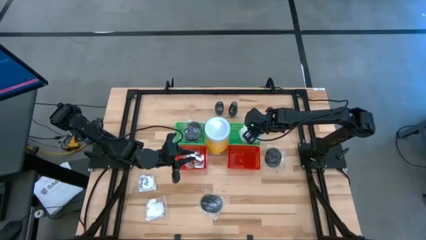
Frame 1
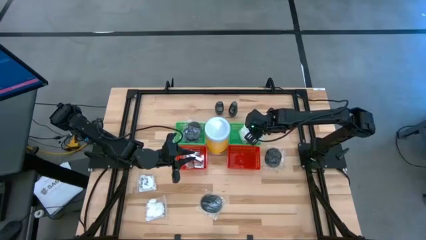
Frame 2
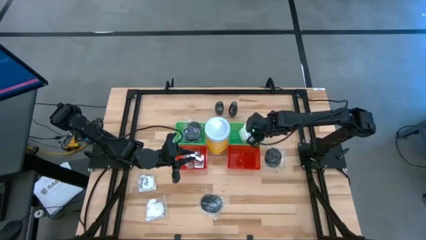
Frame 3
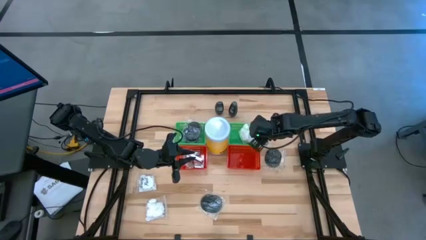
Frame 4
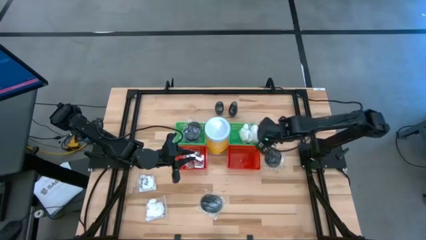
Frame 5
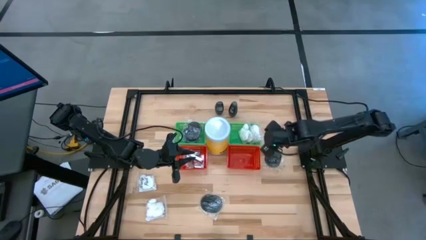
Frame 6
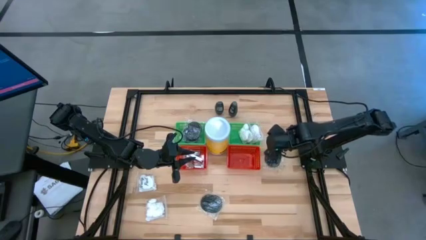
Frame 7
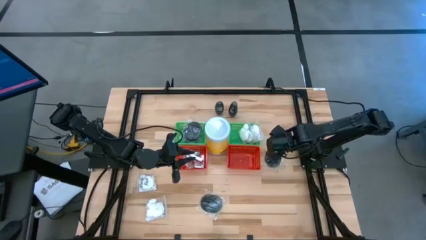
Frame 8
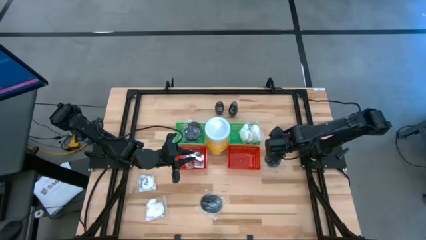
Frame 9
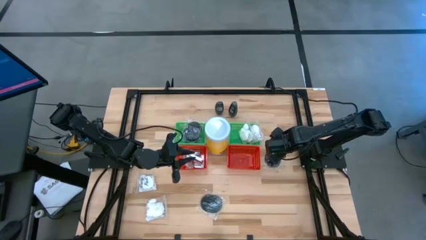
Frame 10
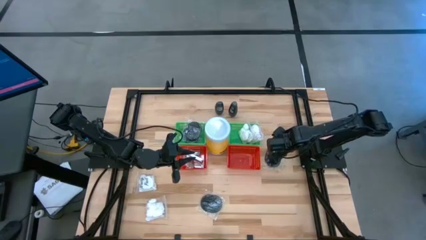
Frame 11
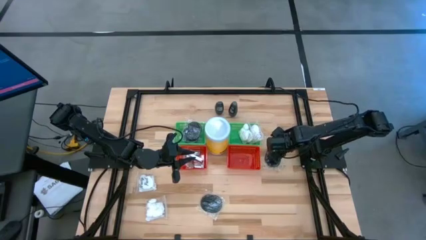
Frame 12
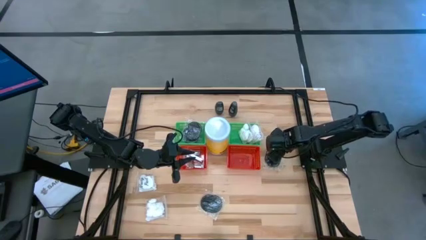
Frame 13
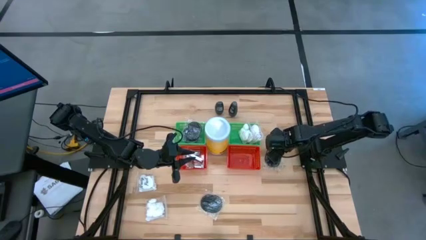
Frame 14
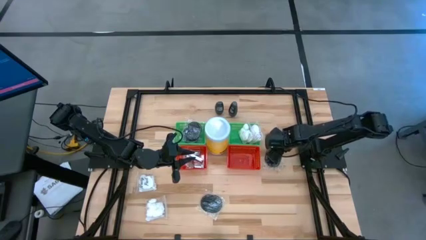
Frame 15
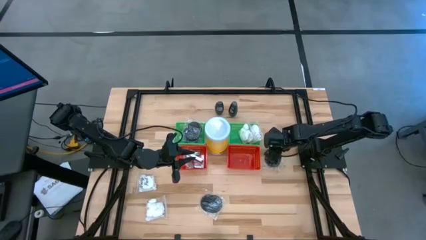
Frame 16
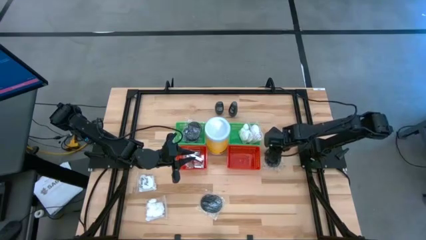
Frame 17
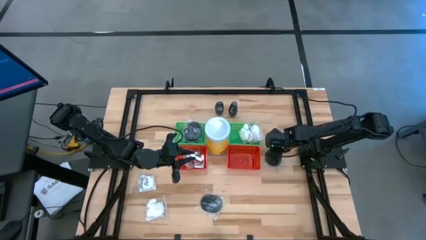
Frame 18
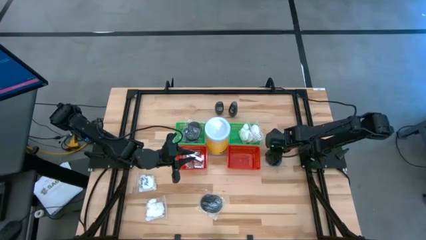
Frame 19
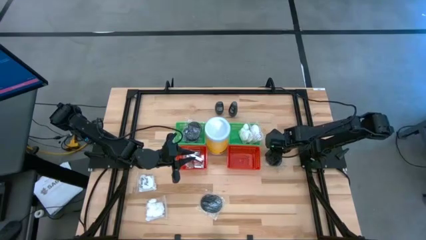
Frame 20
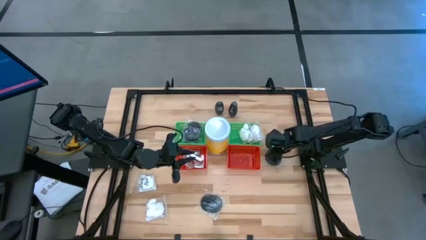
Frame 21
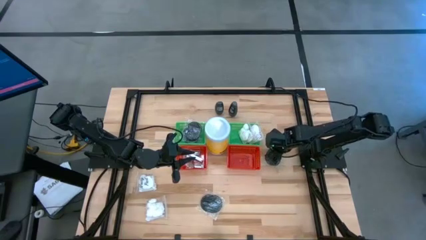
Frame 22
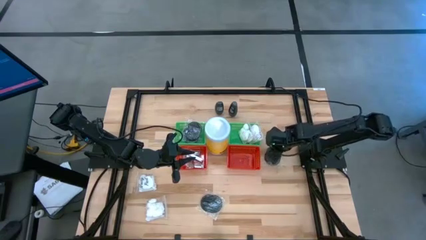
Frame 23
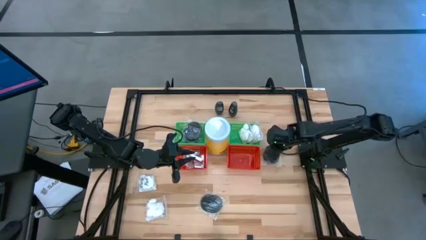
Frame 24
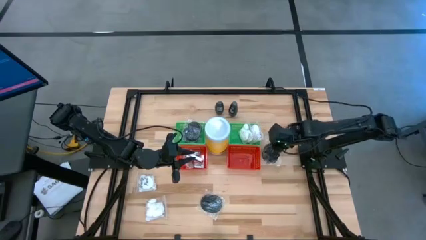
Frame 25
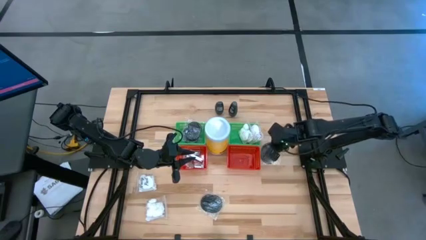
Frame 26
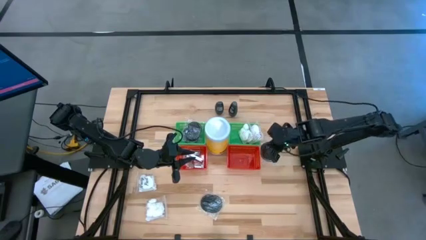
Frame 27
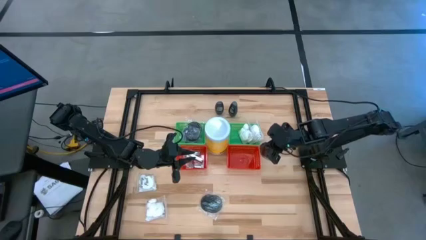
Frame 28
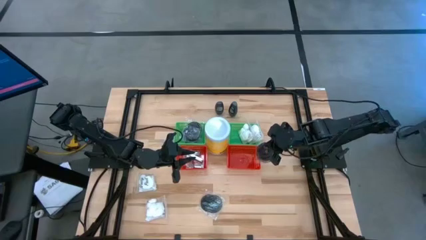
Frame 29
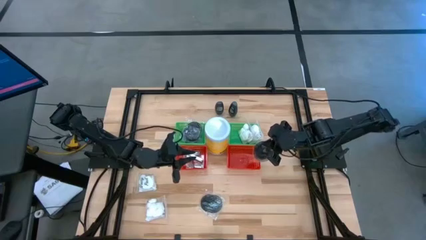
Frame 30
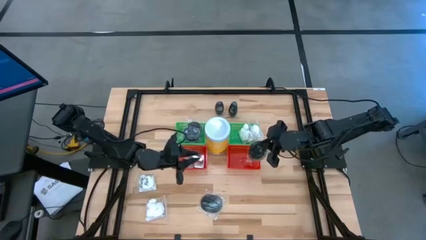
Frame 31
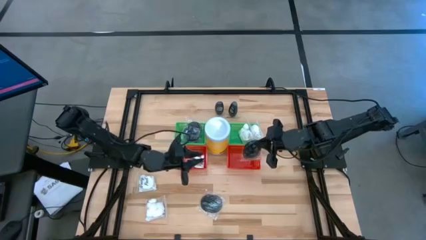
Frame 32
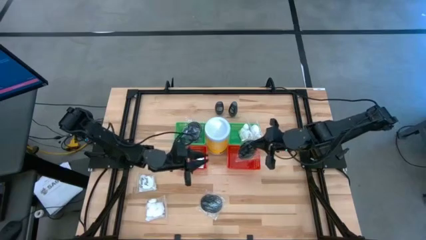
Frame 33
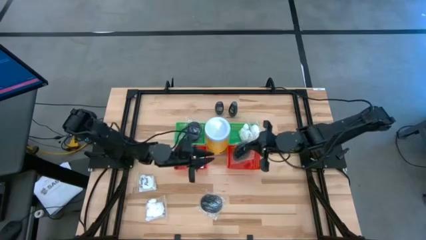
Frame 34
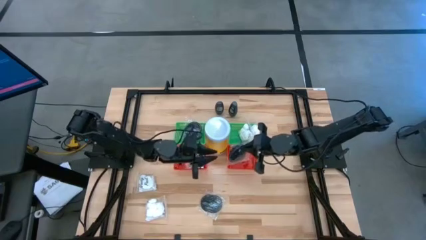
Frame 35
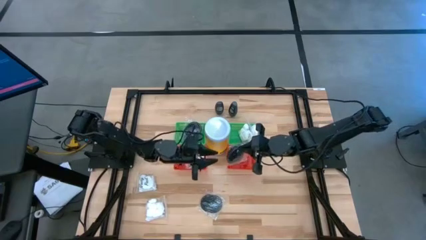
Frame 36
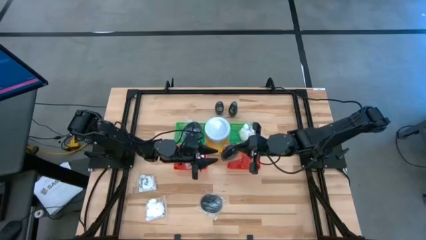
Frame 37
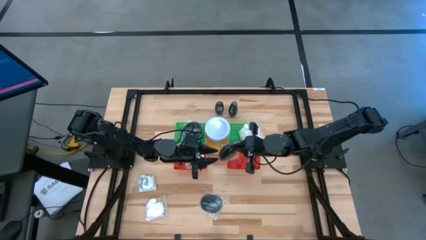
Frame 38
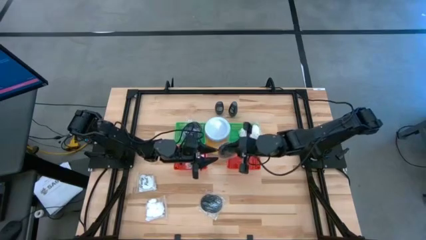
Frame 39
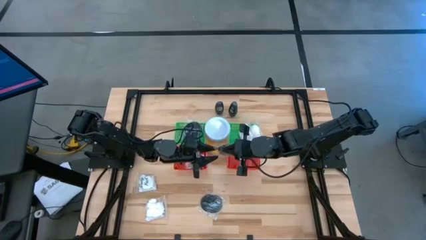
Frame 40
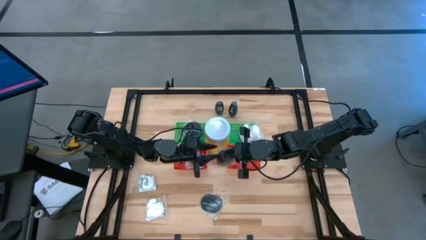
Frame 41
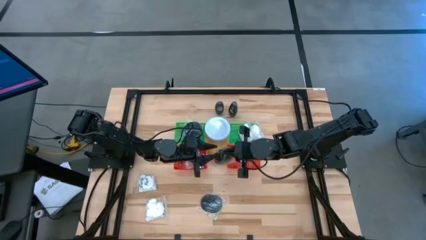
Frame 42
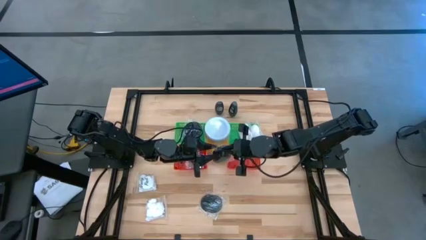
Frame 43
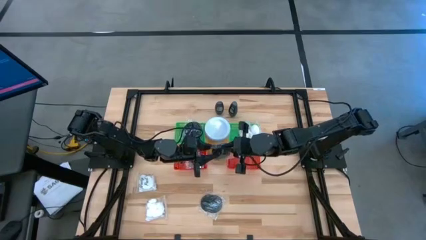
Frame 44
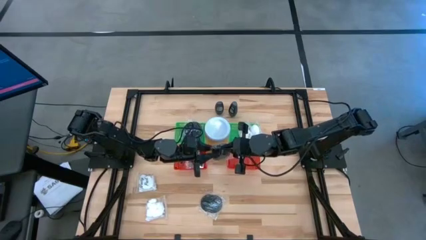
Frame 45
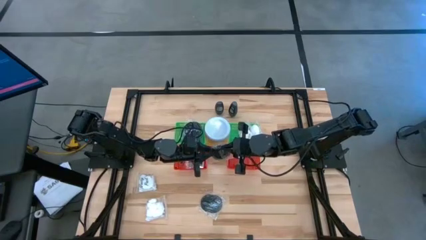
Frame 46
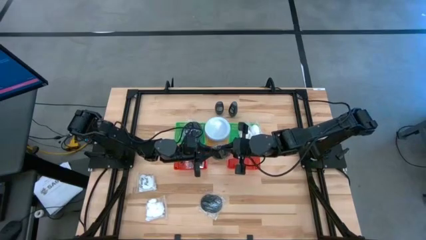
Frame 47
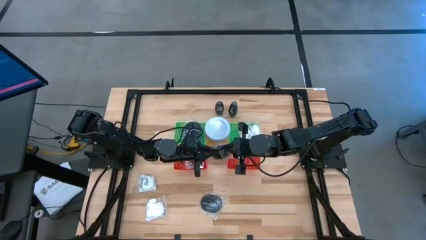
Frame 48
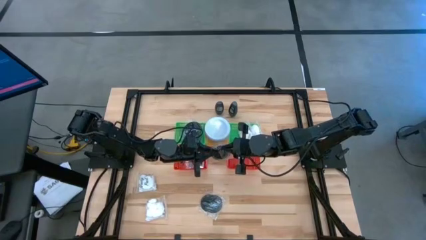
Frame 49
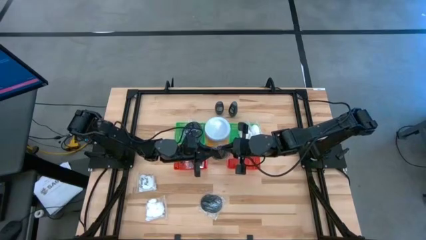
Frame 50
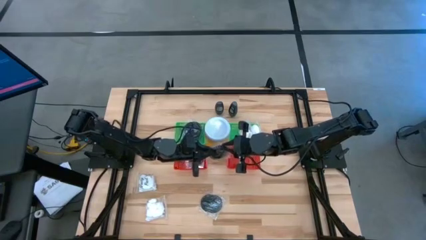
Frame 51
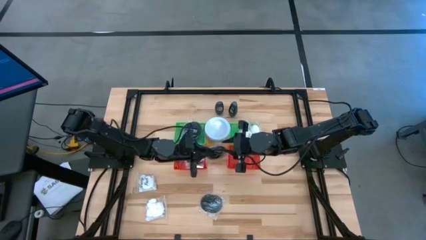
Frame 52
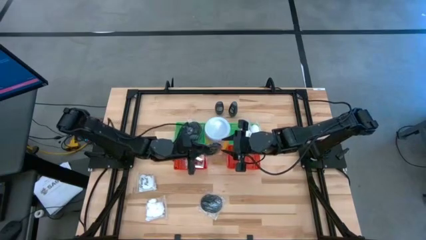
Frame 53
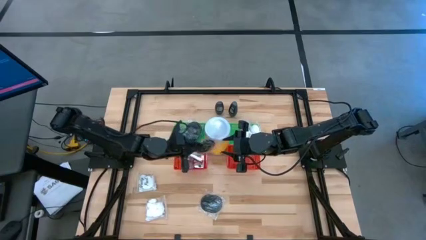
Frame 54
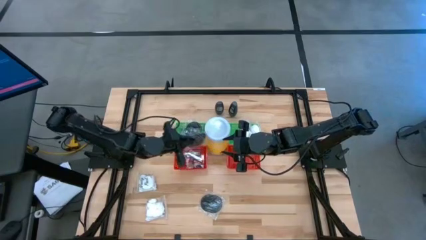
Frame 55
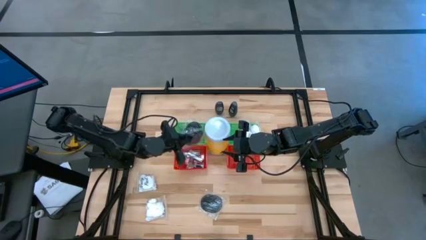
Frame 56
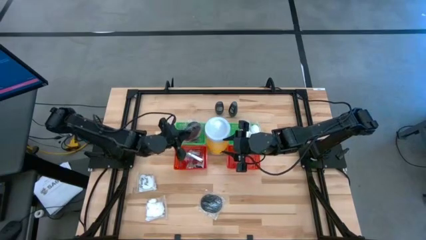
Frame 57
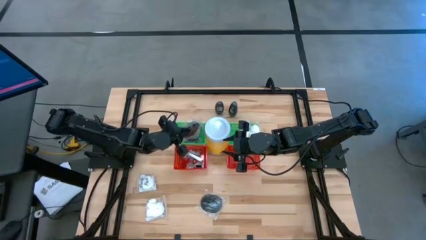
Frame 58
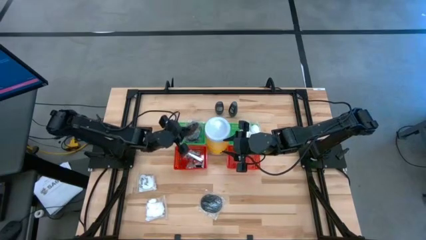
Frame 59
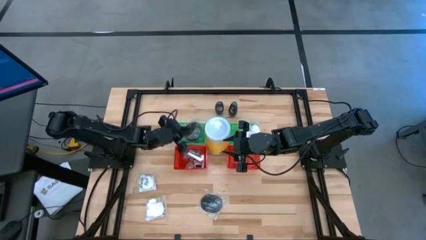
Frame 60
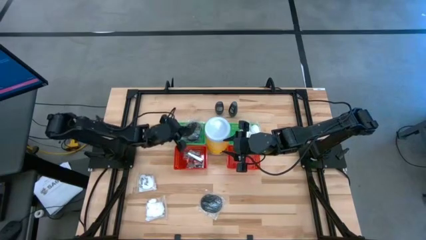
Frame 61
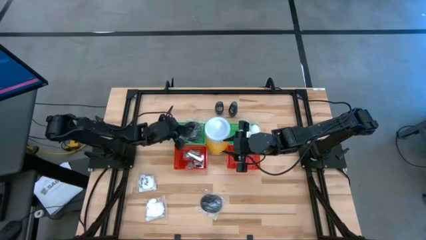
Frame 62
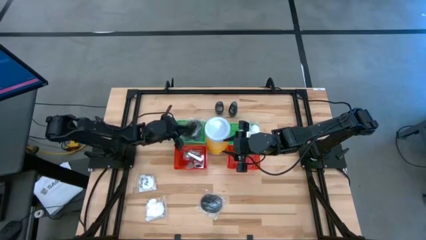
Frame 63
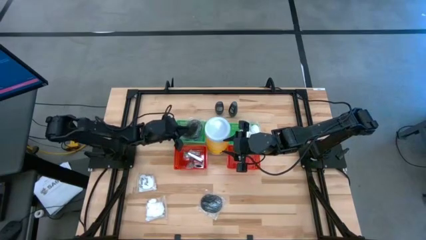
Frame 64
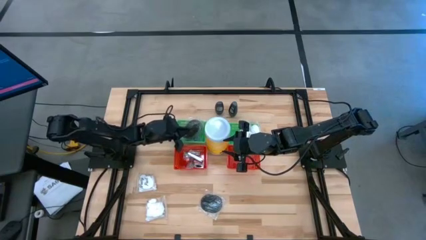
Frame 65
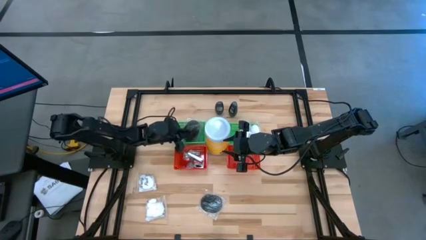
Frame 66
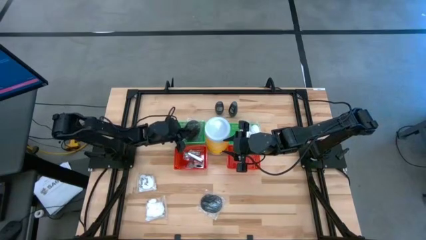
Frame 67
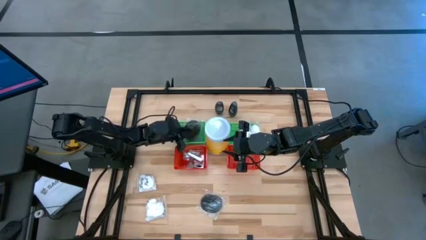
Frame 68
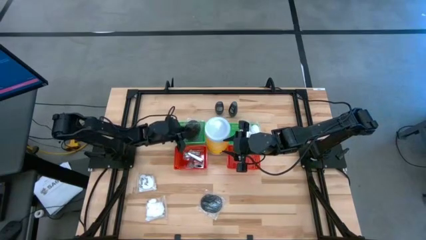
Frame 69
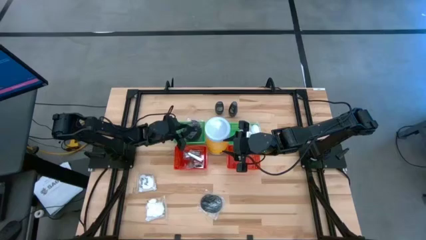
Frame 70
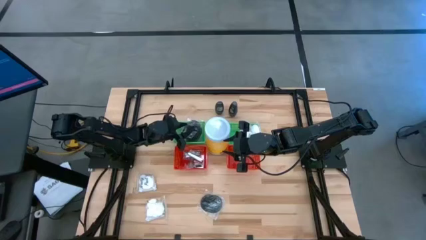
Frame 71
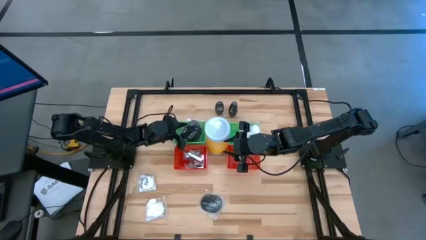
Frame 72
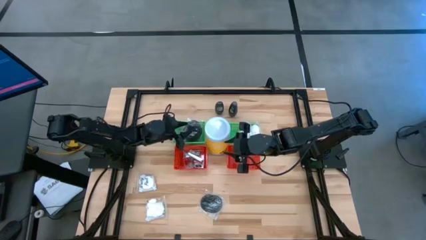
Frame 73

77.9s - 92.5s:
Task: Pick & Place Travel size toiletries
Put the right hairbrush into the left green basket
